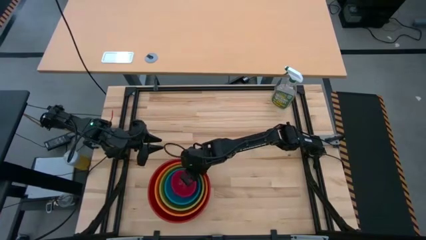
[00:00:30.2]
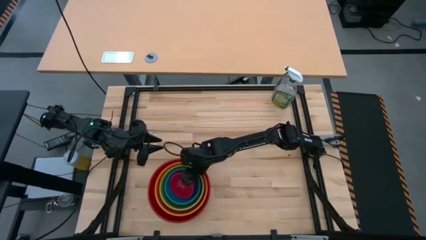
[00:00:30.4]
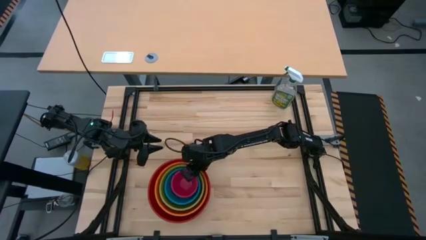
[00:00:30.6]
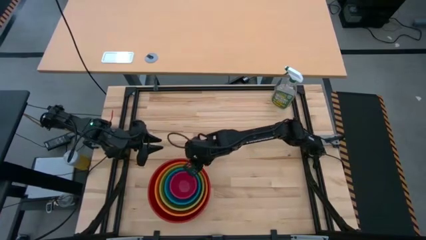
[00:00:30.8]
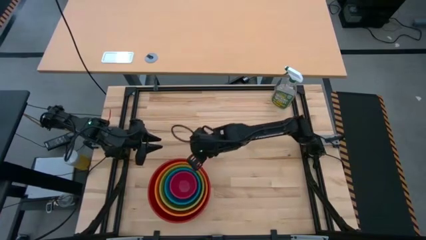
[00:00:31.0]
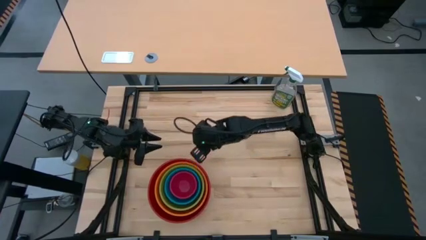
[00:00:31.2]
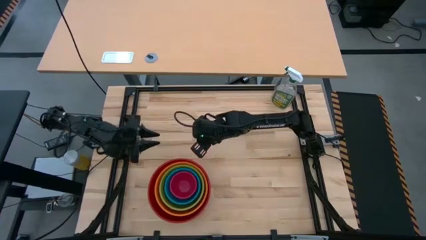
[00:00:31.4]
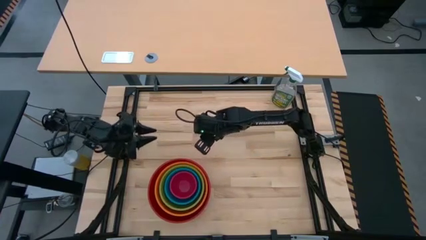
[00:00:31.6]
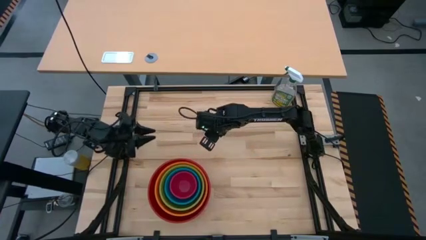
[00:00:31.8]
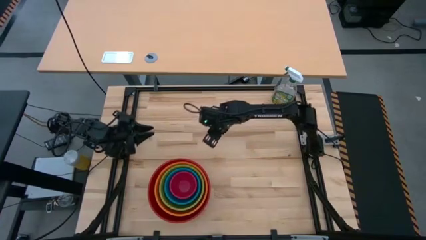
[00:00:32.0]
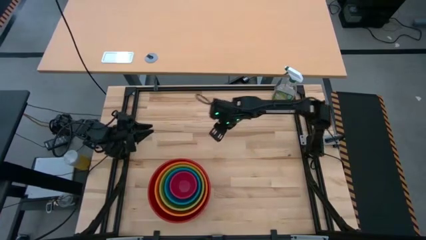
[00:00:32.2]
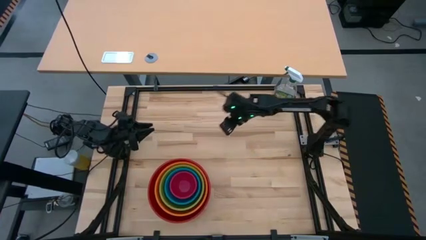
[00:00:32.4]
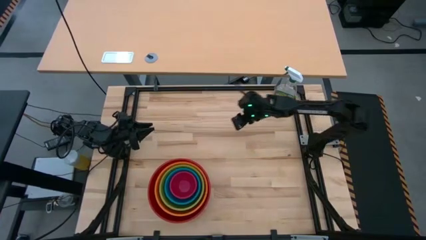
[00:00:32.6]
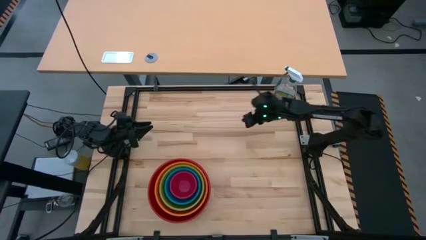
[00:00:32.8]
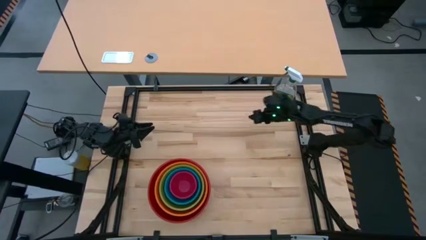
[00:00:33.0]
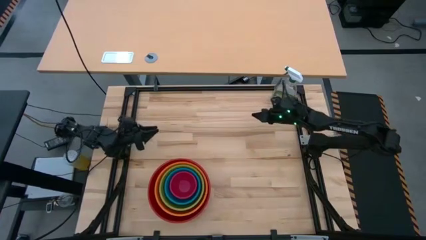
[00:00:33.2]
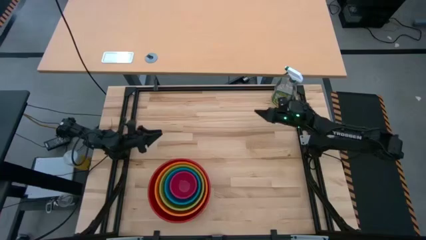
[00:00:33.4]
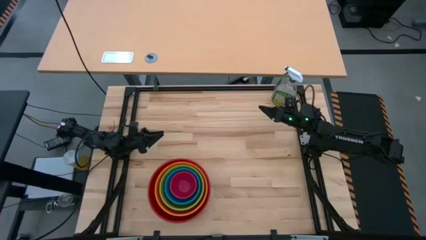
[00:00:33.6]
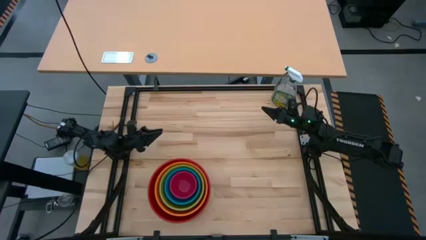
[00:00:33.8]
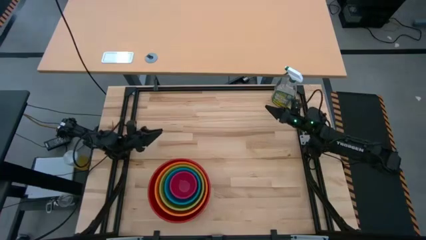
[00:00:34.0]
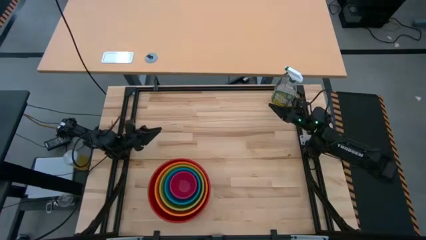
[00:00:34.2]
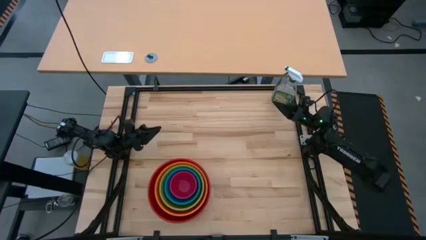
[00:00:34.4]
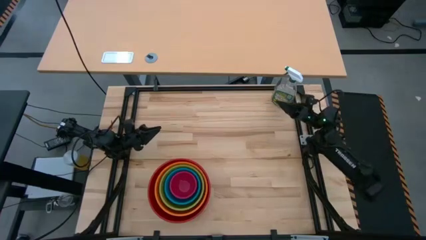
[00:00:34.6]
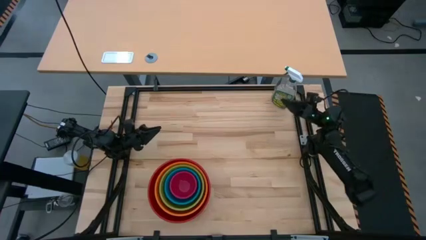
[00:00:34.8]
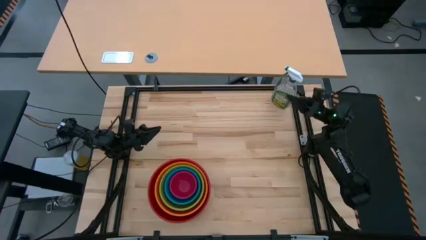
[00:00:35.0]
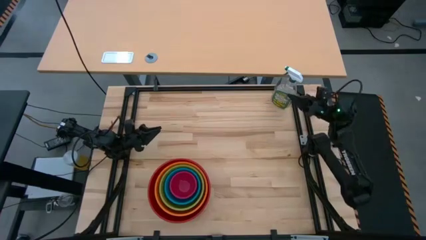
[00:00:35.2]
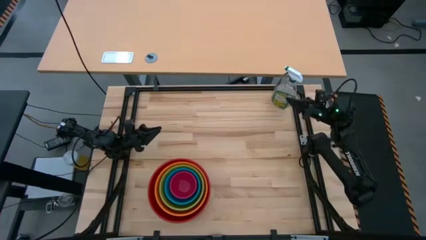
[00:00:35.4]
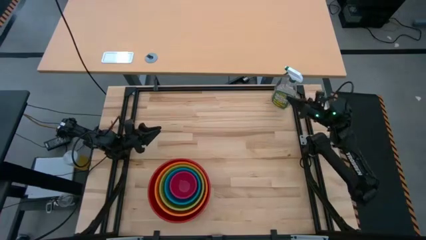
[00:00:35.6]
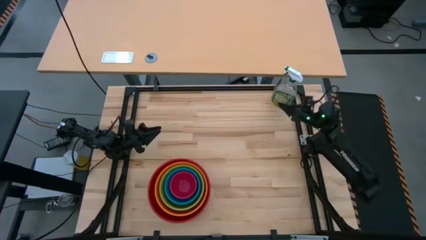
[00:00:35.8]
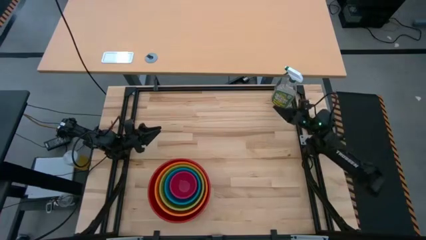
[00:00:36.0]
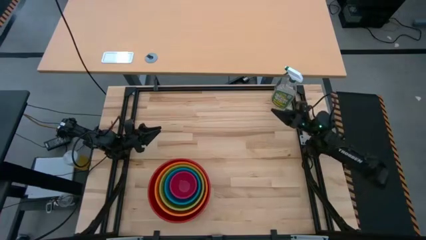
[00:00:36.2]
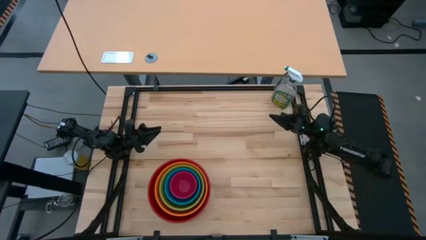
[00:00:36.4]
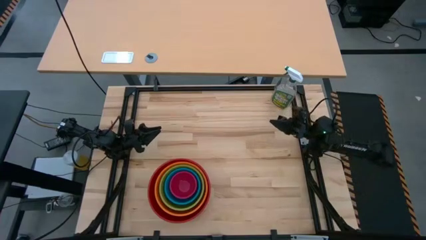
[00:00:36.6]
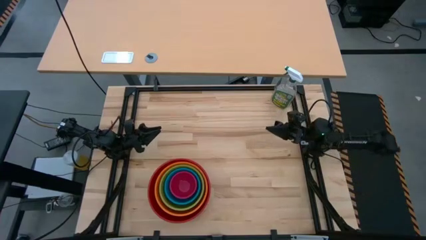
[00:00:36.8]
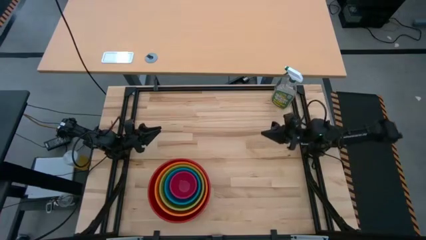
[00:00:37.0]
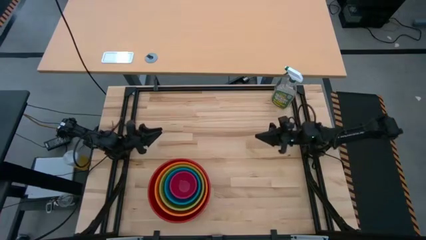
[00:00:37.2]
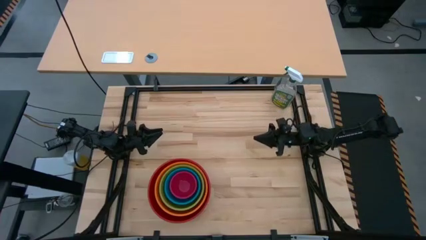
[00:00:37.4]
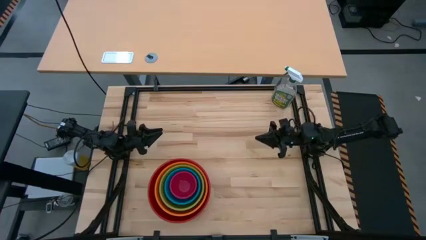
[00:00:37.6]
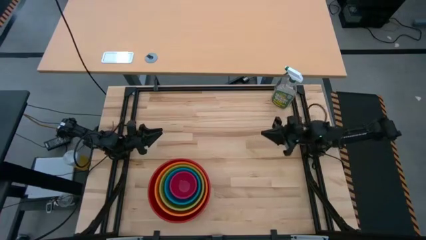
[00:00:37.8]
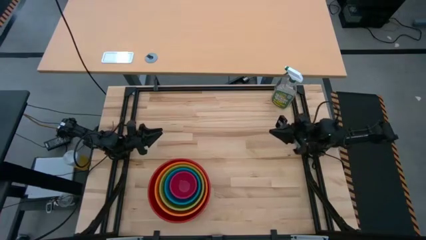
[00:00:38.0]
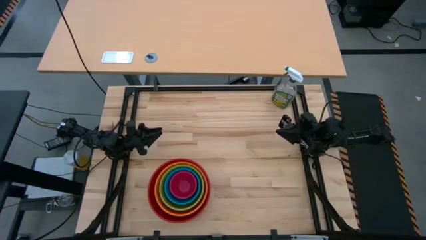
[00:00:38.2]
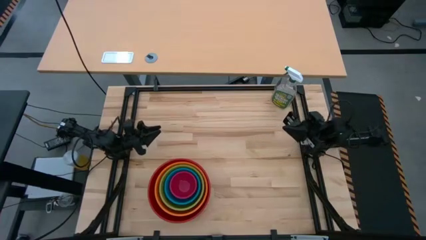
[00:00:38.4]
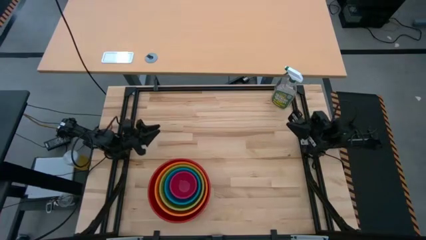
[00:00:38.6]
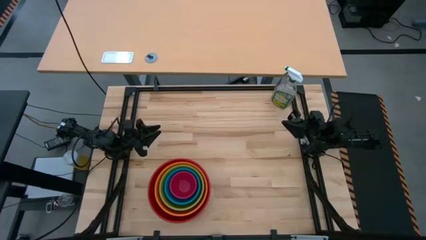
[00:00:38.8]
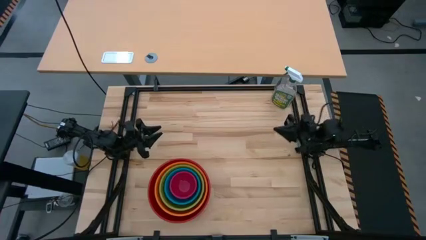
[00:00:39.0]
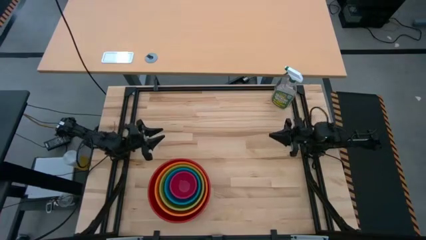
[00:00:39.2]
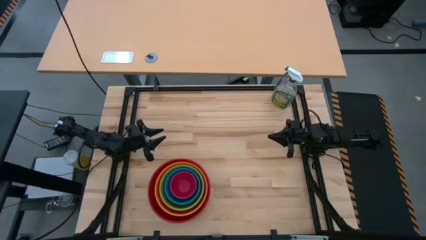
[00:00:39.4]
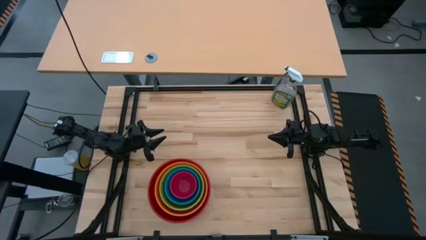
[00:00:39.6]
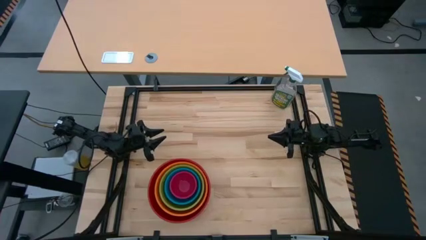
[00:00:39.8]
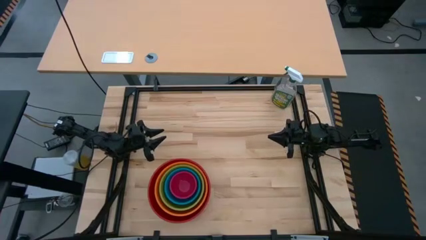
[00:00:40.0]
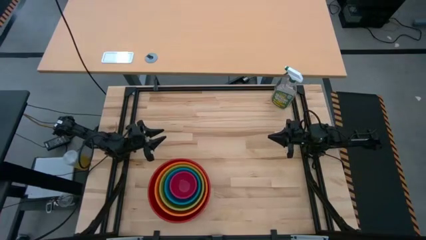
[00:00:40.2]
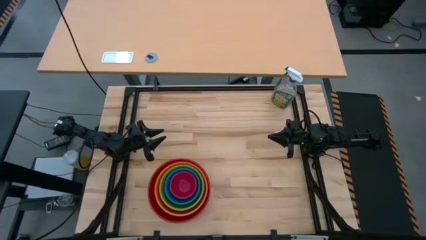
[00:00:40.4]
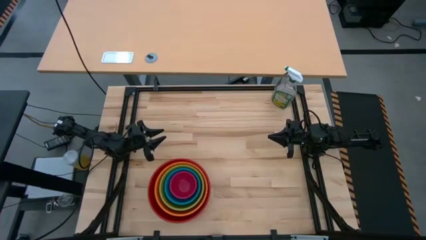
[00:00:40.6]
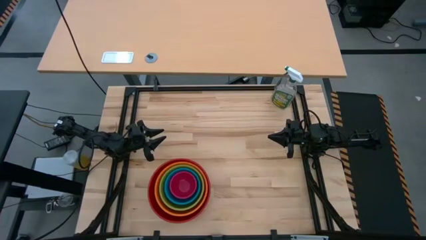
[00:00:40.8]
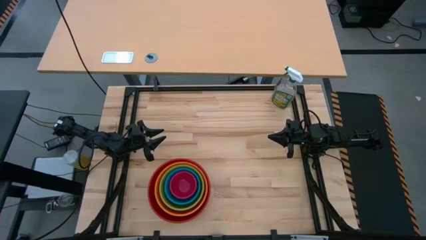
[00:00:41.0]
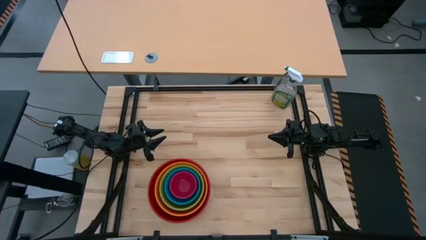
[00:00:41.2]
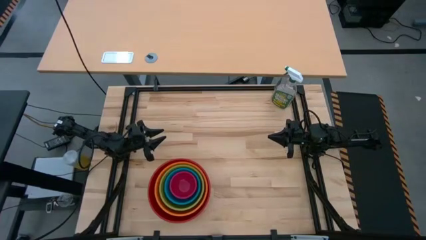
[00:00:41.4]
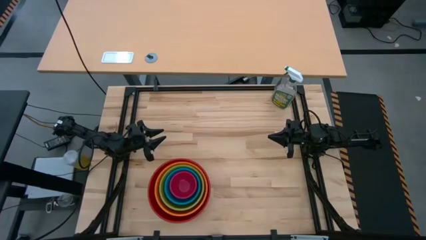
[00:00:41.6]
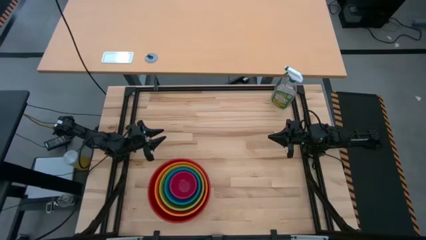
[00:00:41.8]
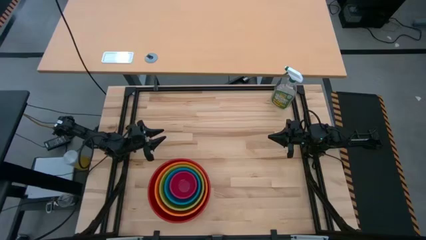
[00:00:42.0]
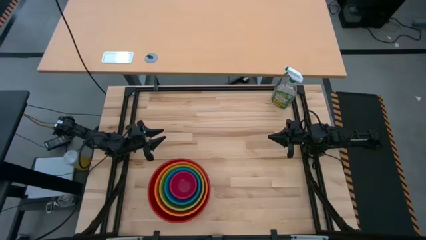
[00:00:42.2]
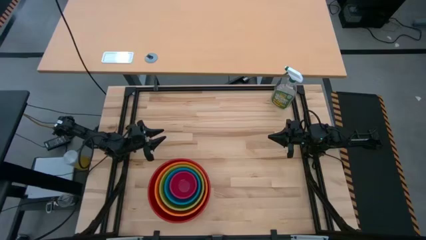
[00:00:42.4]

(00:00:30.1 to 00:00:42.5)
Return to Home Position

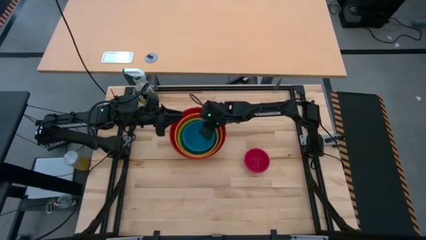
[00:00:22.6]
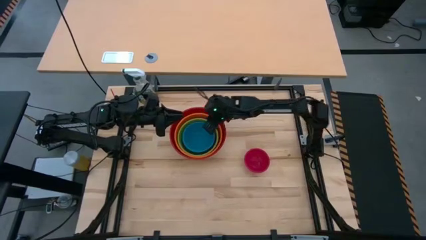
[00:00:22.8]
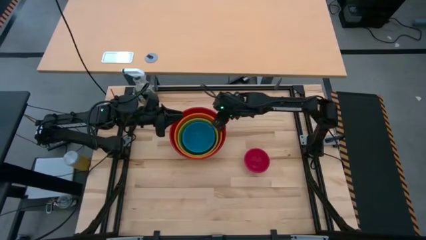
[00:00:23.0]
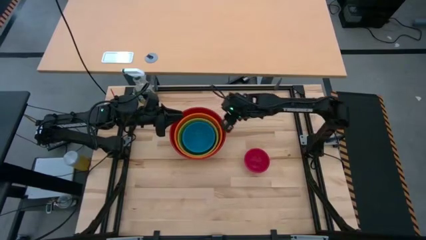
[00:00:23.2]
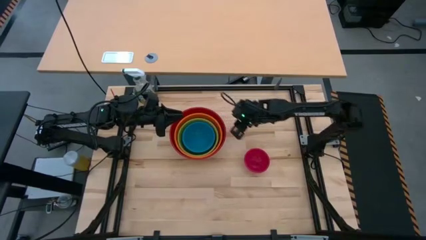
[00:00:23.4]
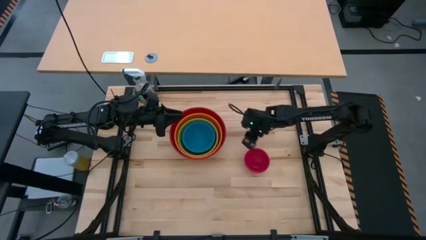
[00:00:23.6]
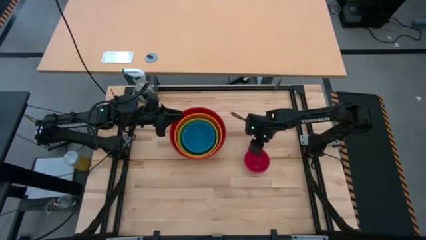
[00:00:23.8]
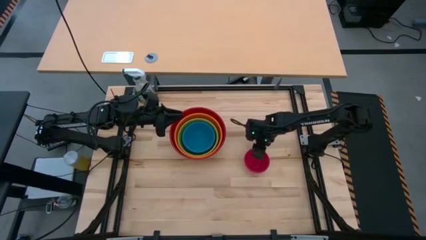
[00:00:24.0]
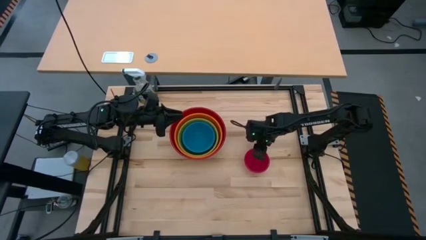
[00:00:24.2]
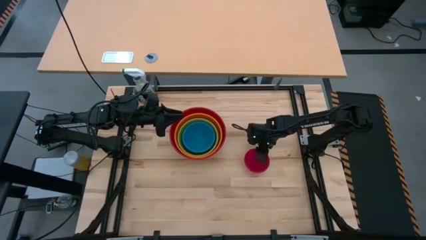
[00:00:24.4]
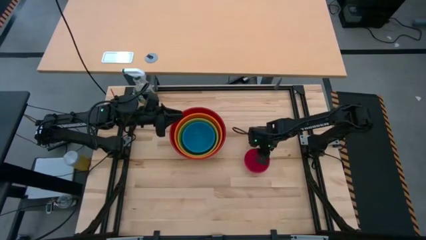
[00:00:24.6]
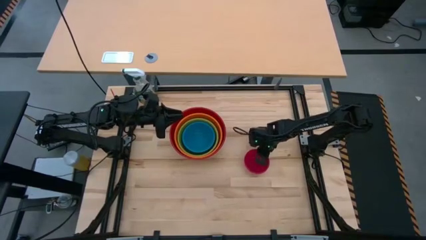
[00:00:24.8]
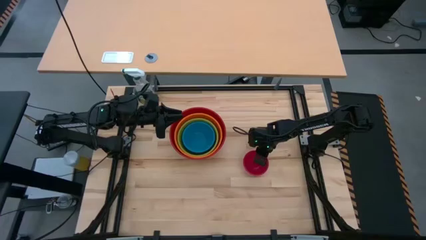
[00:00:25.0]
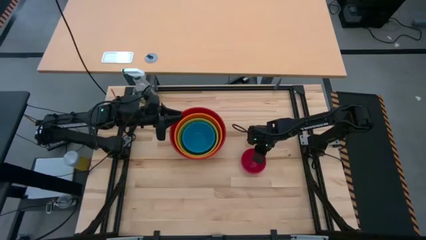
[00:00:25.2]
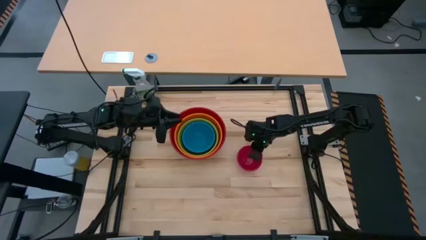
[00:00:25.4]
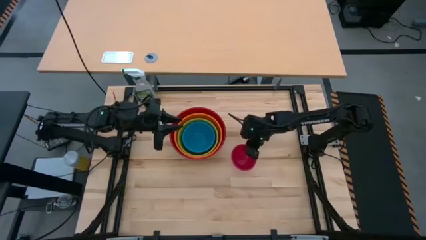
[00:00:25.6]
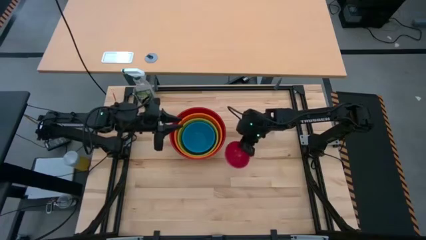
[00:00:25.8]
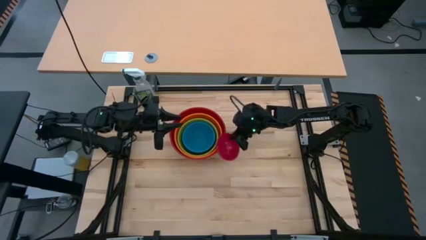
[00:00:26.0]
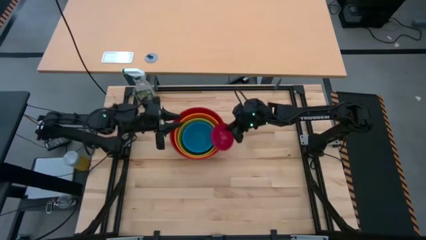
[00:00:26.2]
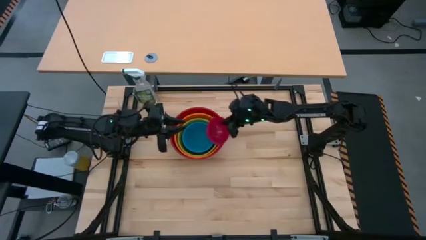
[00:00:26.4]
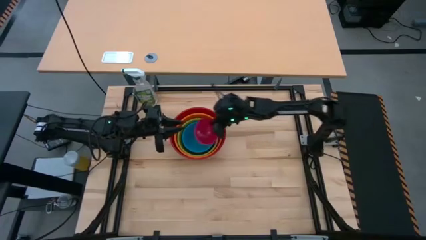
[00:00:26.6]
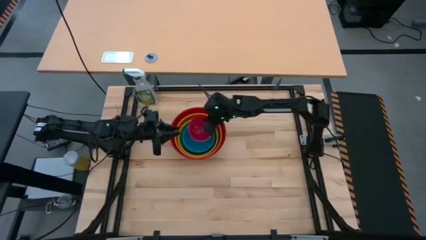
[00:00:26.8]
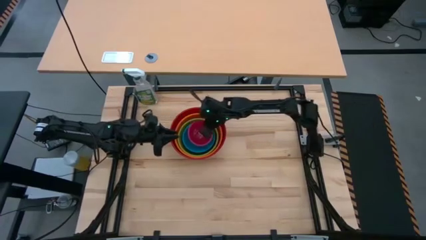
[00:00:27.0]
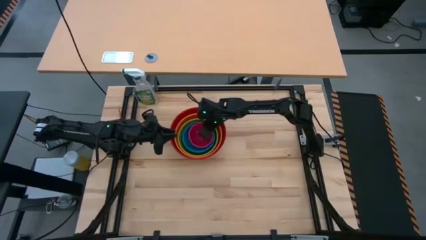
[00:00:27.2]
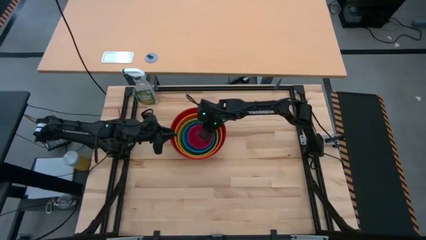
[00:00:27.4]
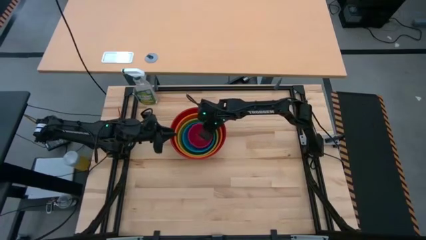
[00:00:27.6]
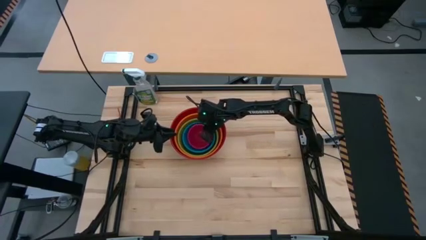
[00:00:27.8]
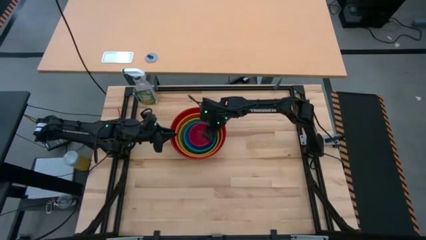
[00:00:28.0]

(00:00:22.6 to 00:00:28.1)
Stack the red bowl on the blue bowl
